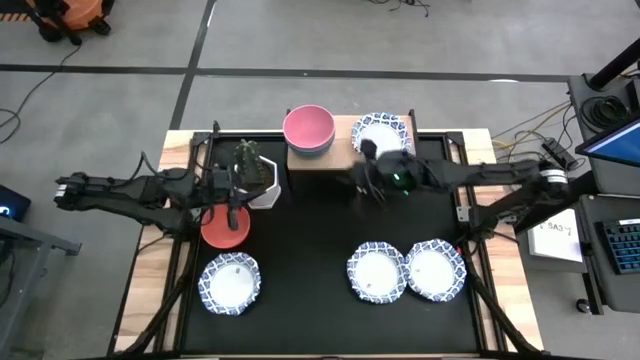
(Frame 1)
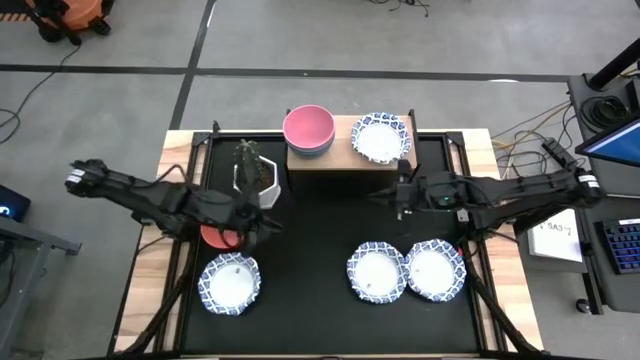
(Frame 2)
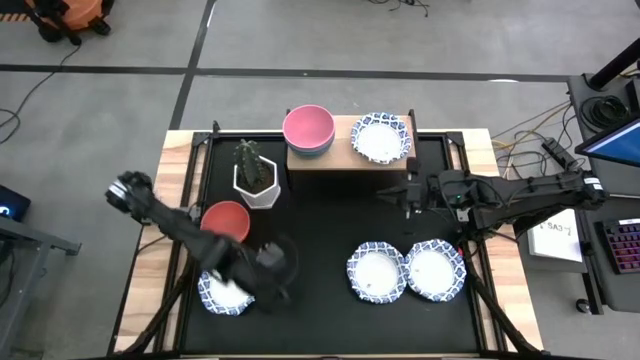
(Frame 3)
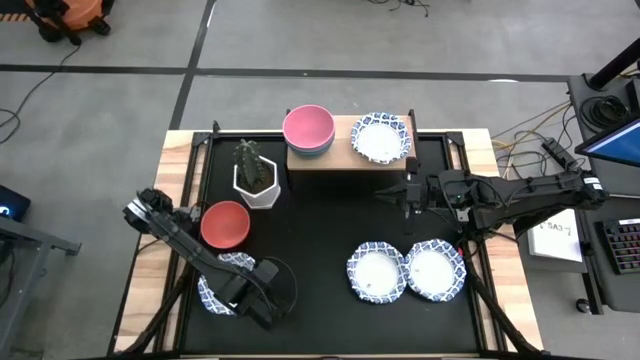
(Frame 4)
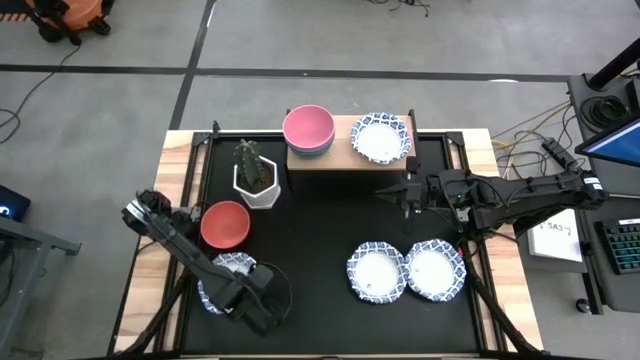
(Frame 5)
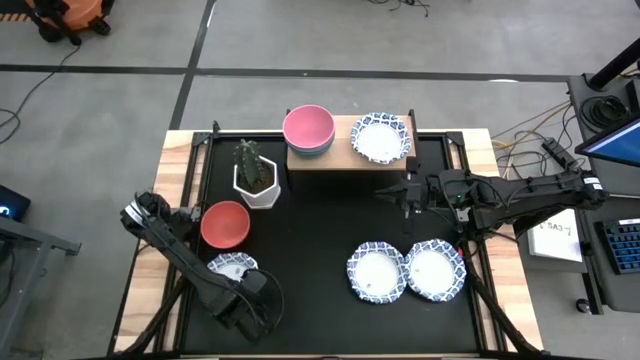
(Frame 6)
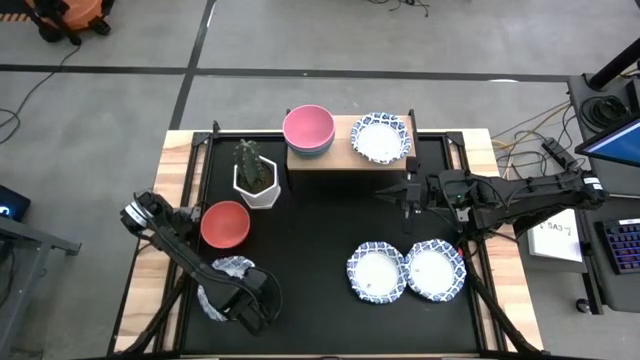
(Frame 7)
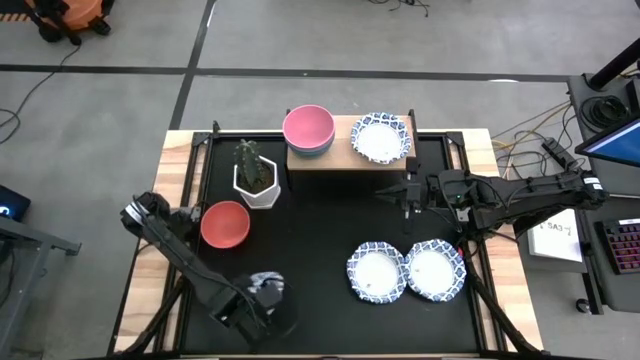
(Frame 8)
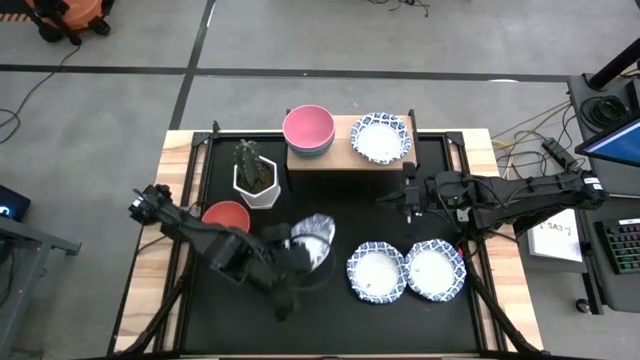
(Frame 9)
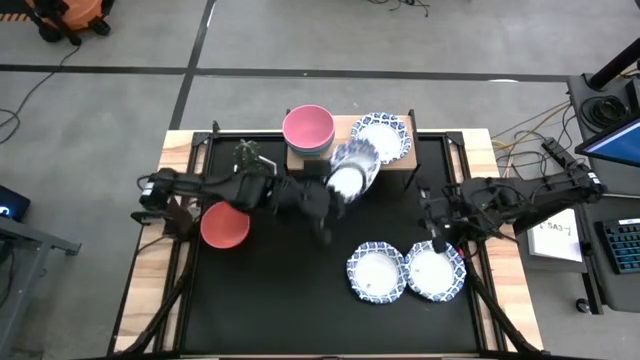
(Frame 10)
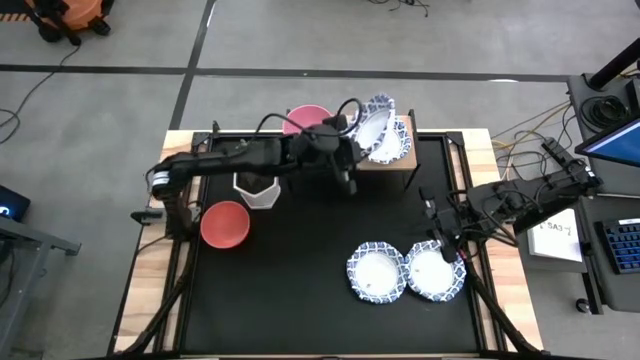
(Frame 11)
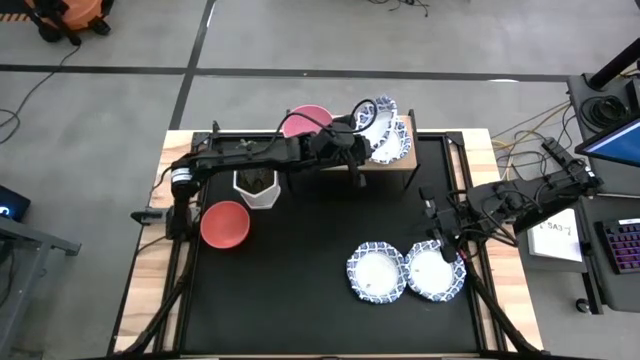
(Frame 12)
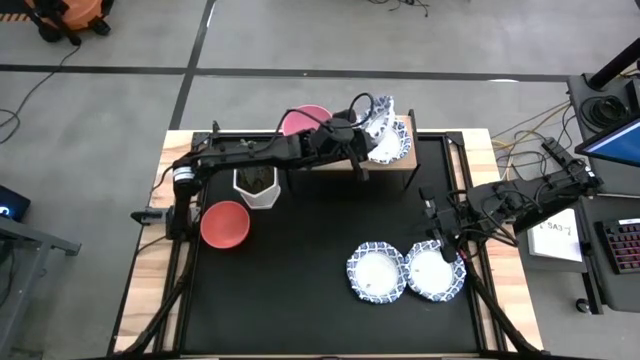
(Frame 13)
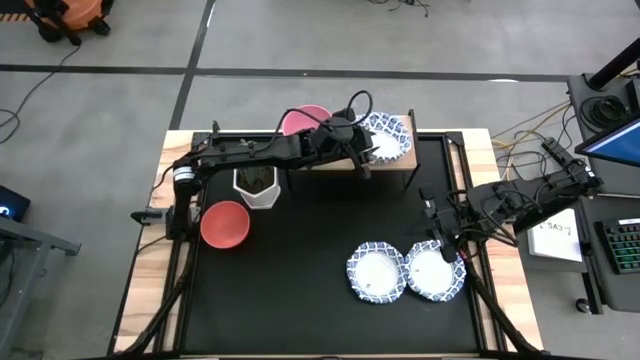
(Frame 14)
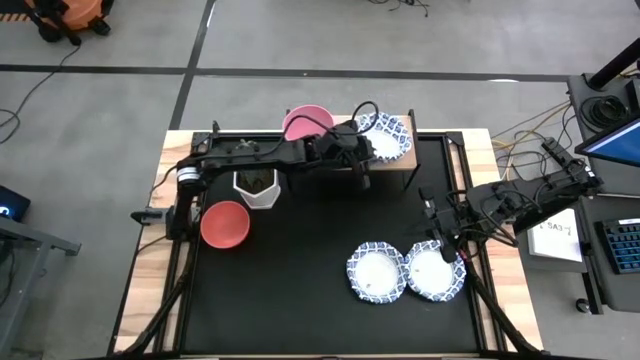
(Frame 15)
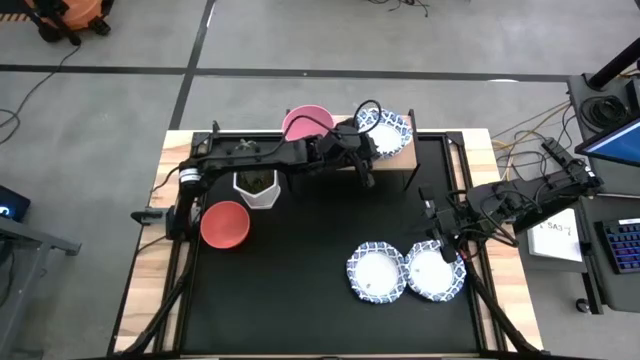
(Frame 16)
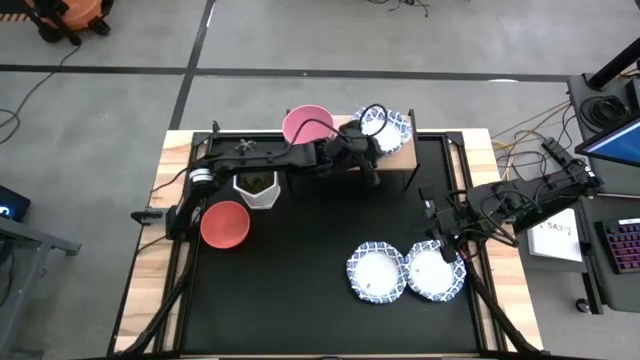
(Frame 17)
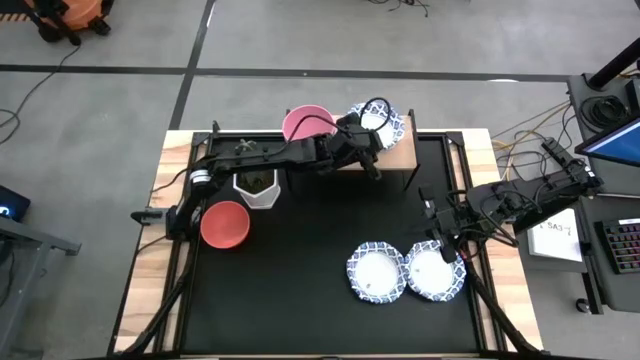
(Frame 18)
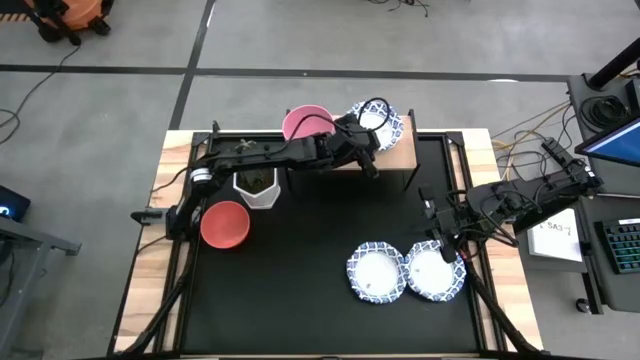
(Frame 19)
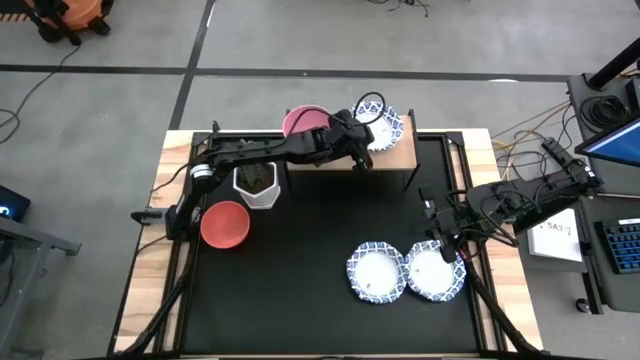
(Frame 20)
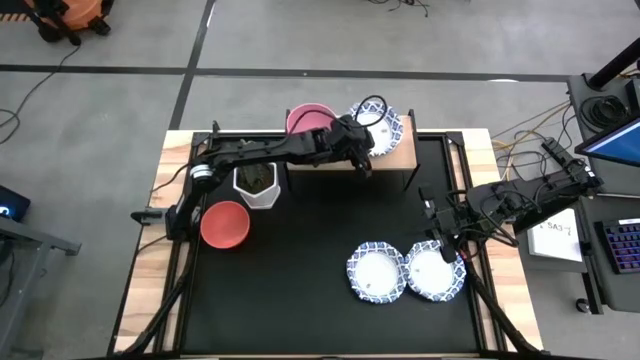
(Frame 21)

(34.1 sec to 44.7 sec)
Task: Place and stack bowls onto a shelf
Stack the left blue patterned bowl on top of the blue patterned bowls on the shelf

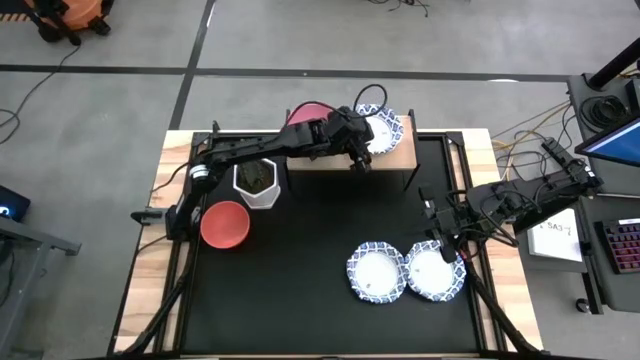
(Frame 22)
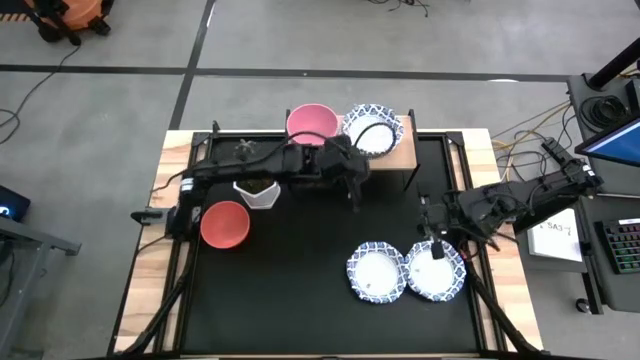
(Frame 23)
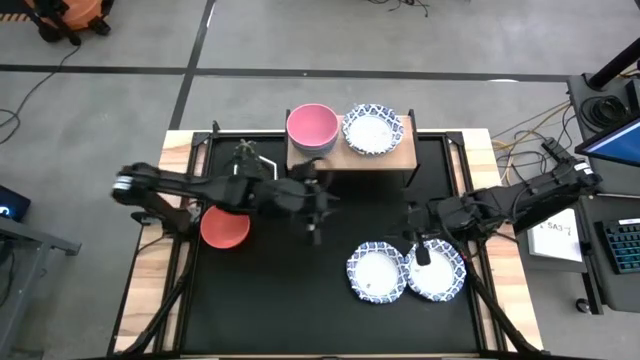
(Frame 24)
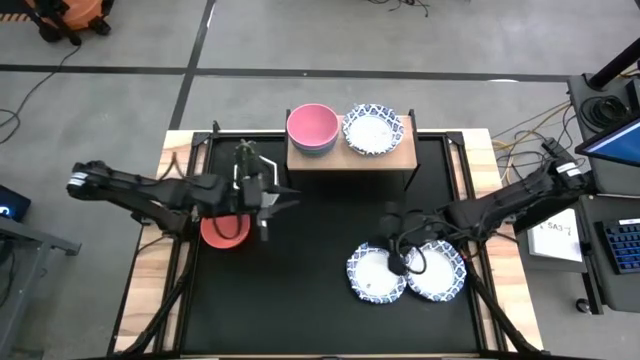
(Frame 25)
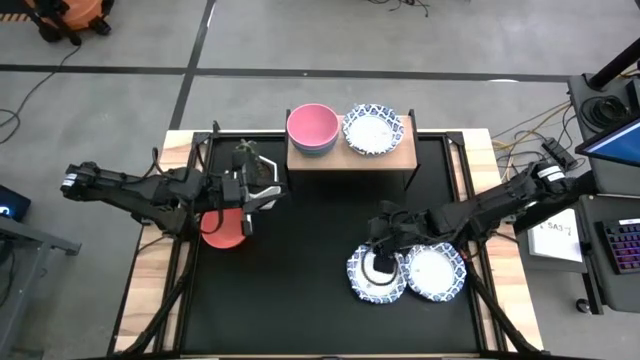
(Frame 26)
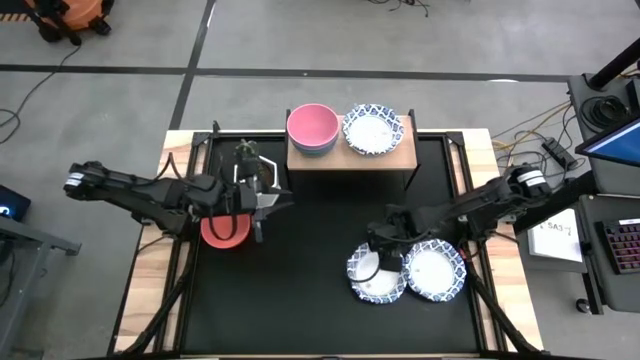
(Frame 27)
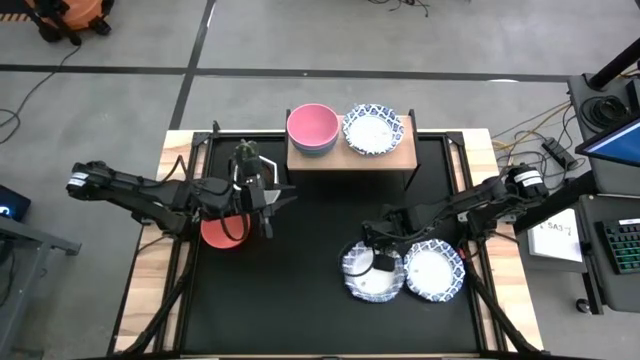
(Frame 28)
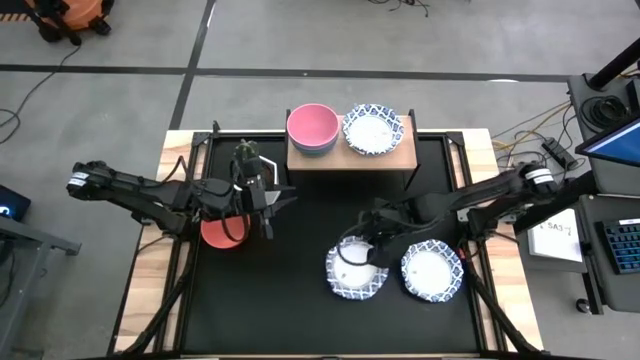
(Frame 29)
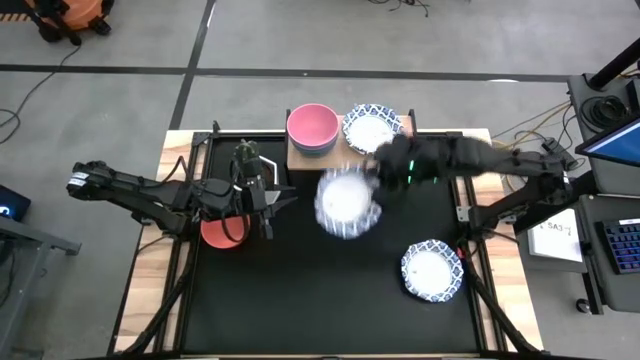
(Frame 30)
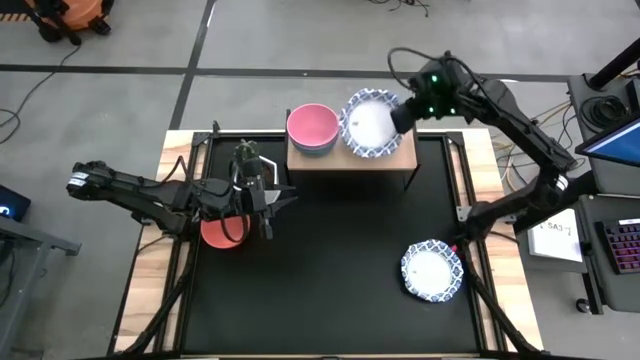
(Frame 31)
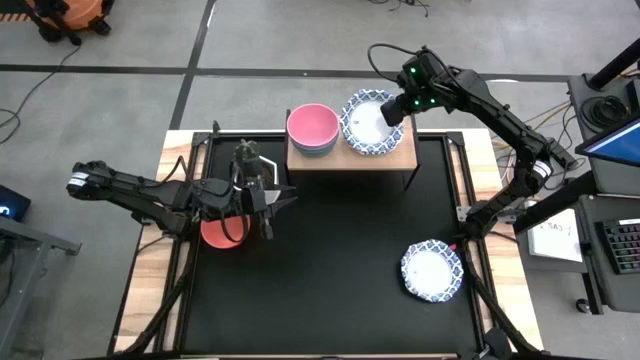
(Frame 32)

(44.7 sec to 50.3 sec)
Stack the left blue patterned bowl on top of the blue patterned bowls on the shelf

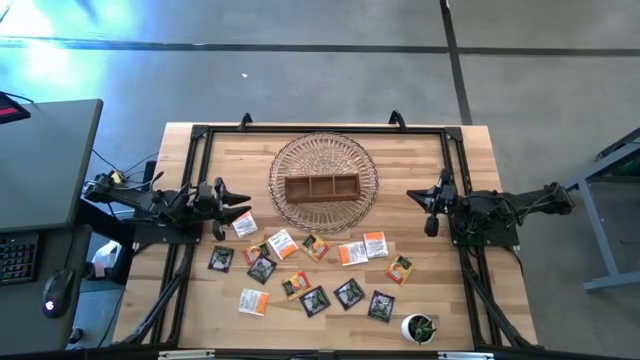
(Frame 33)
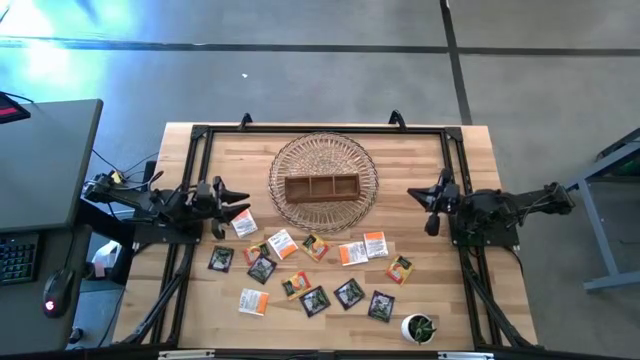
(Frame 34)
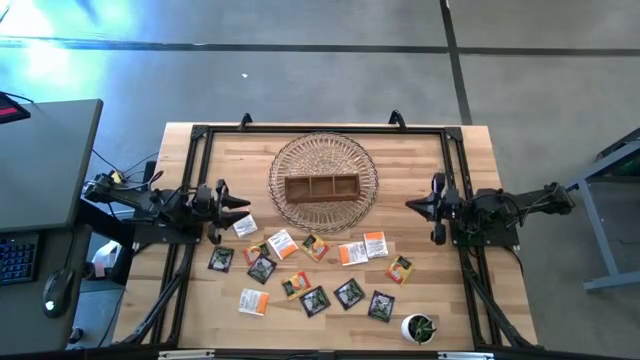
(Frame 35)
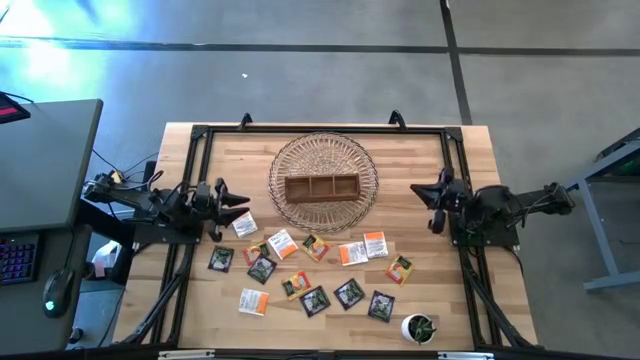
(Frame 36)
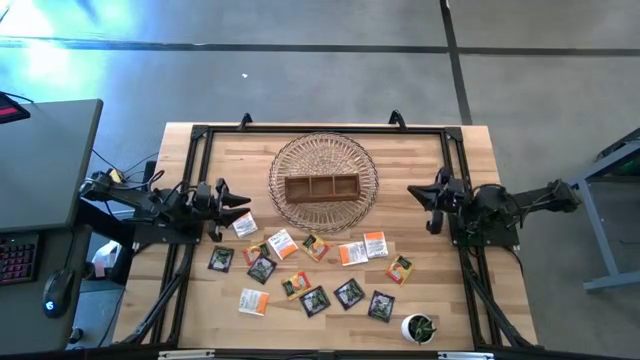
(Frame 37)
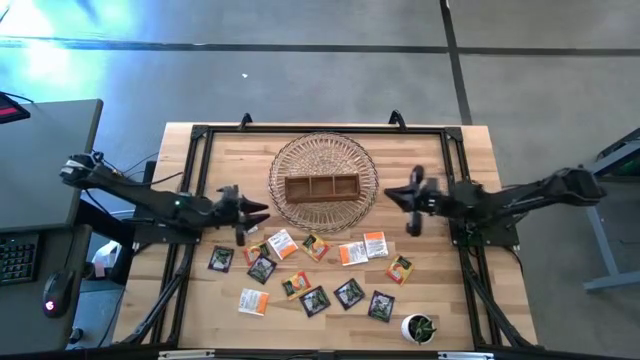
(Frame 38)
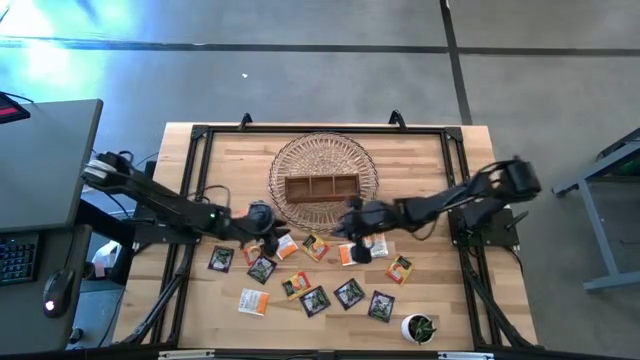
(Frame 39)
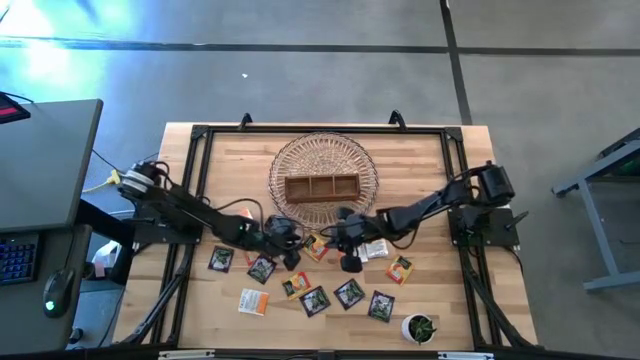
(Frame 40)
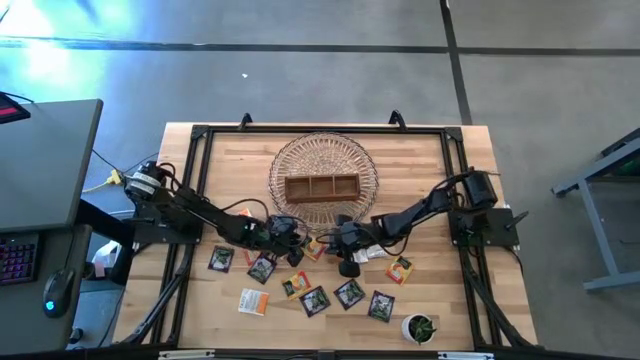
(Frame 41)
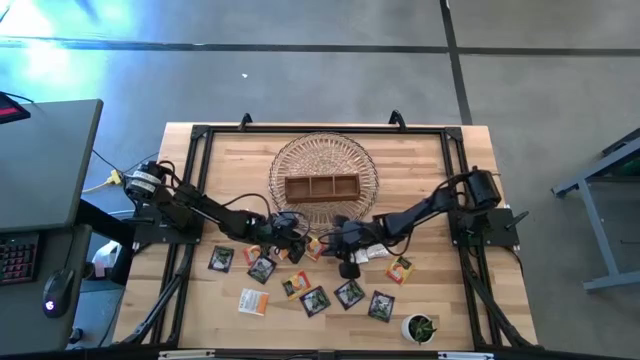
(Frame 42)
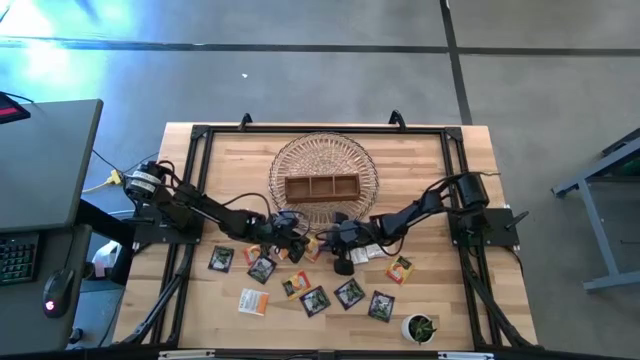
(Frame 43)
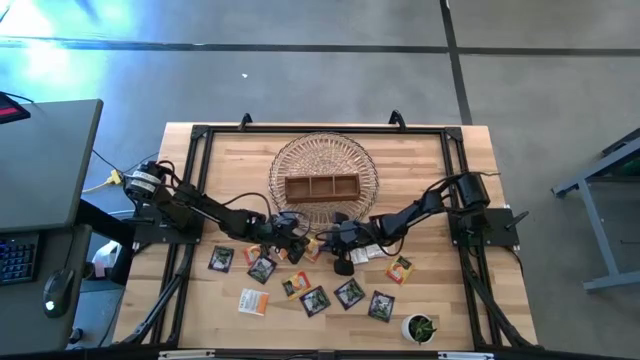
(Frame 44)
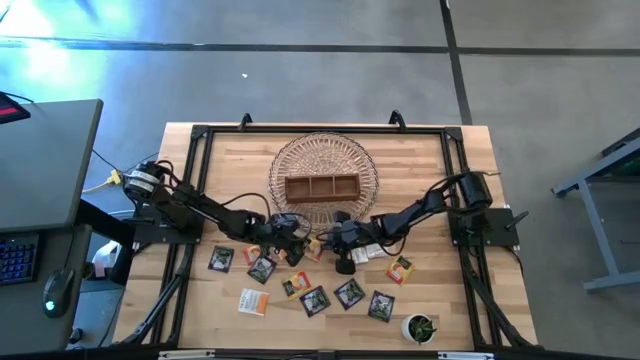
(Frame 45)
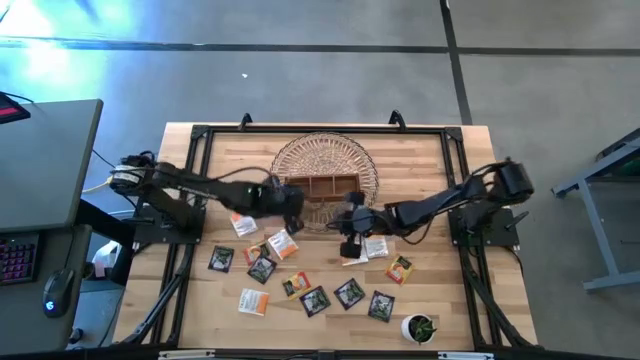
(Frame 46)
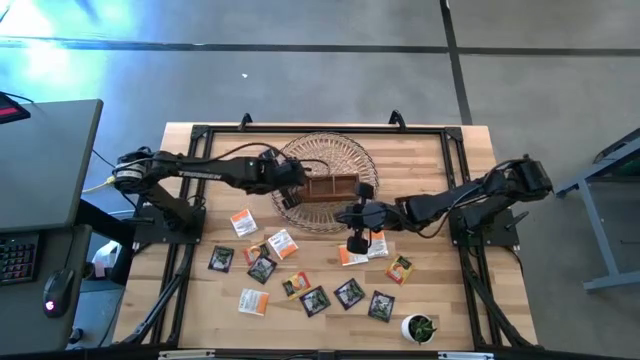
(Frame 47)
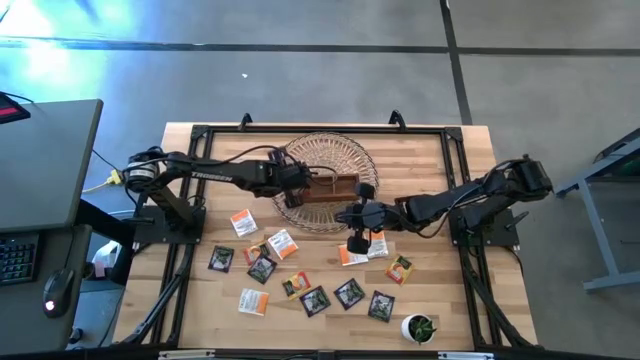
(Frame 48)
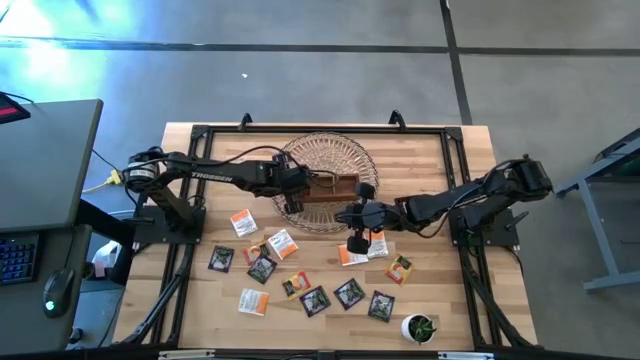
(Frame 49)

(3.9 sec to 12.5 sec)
Task: Pick & Place Tea
Put the yellow tea bag into the left section of the wooden organizer
